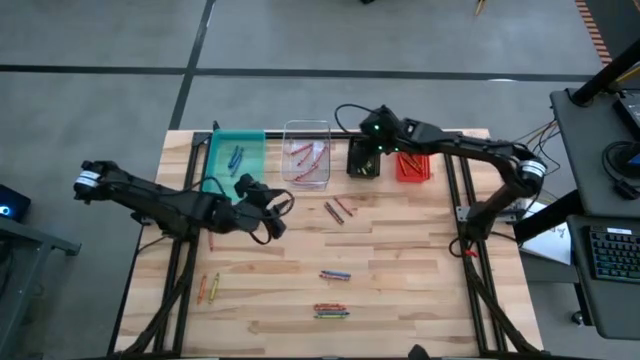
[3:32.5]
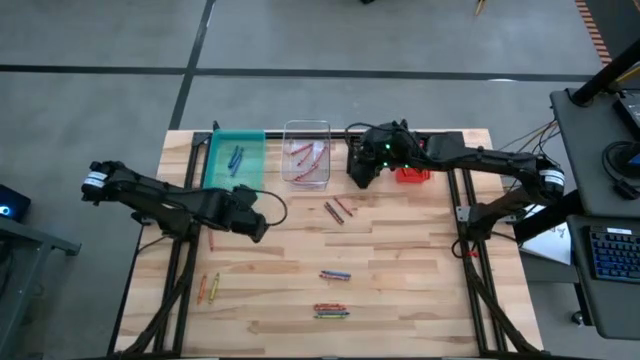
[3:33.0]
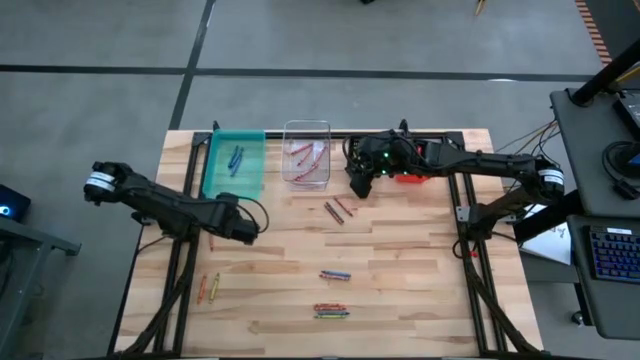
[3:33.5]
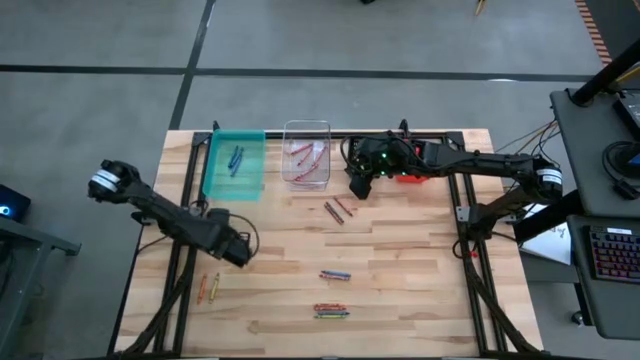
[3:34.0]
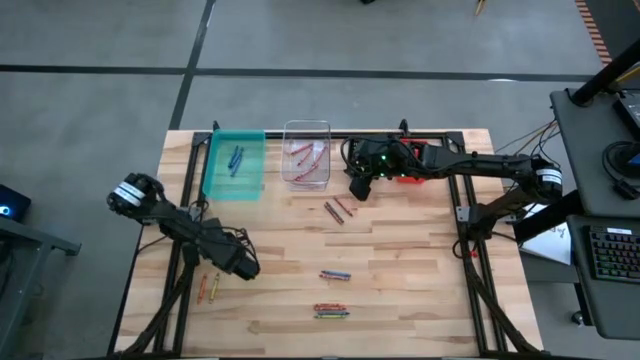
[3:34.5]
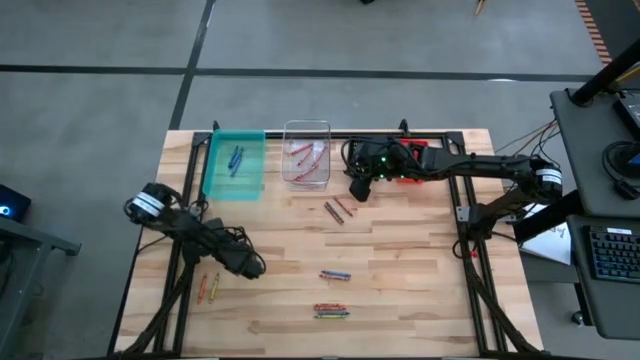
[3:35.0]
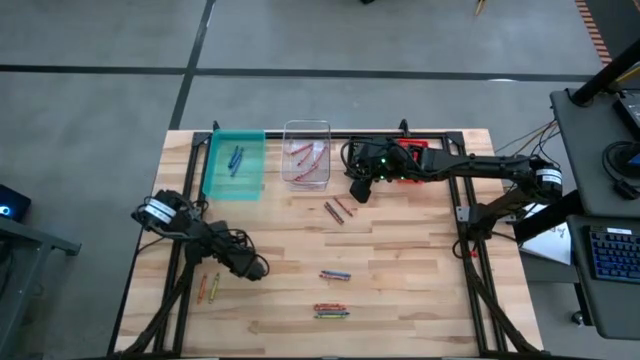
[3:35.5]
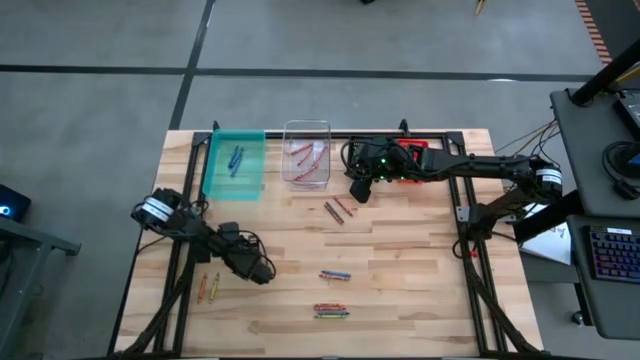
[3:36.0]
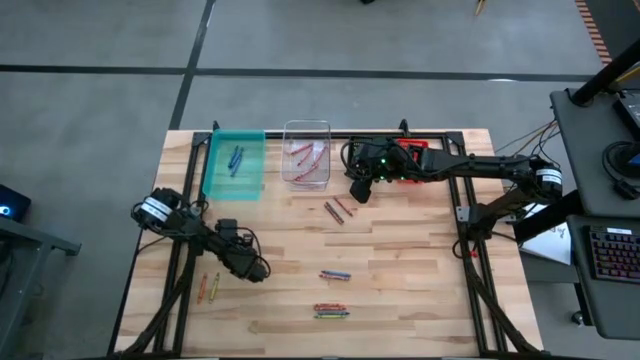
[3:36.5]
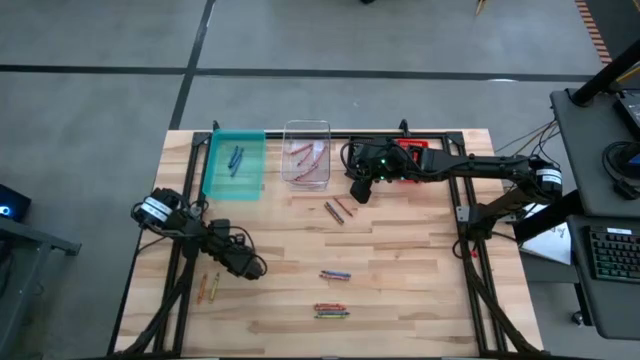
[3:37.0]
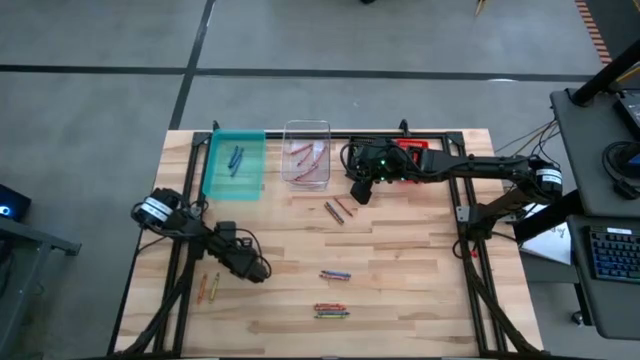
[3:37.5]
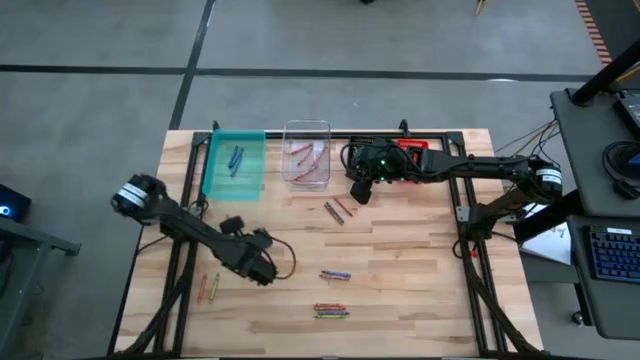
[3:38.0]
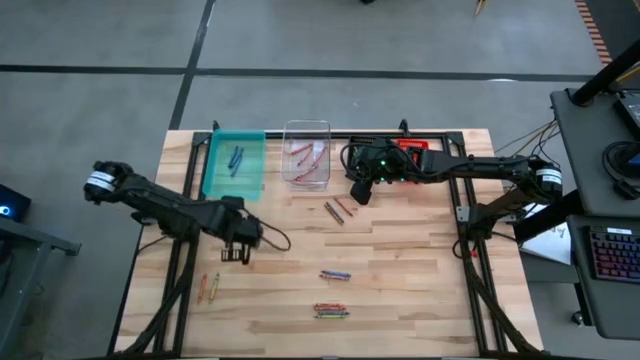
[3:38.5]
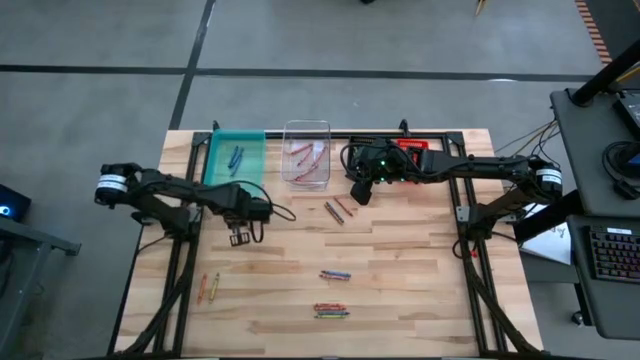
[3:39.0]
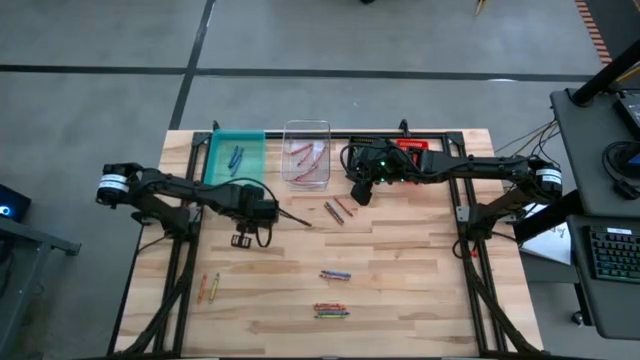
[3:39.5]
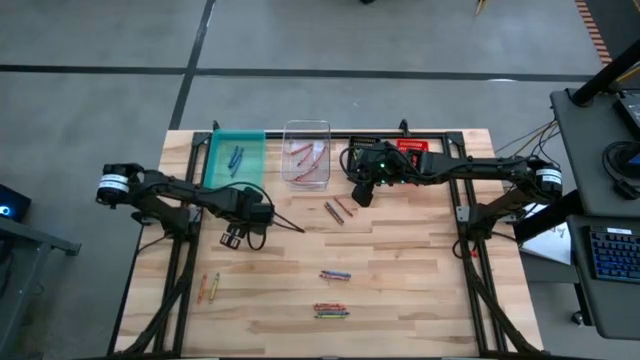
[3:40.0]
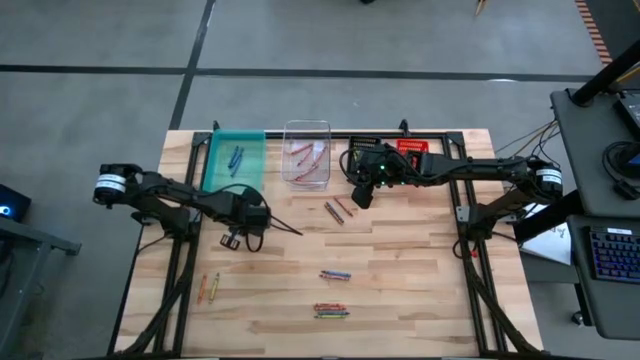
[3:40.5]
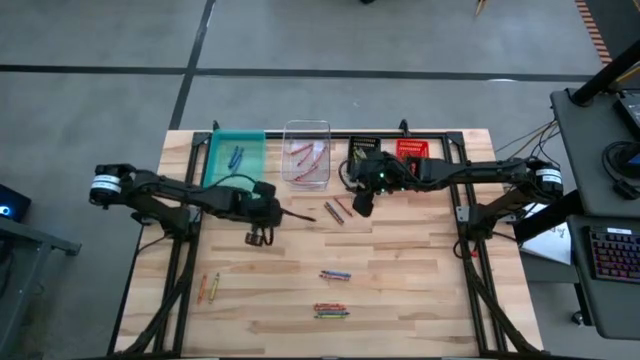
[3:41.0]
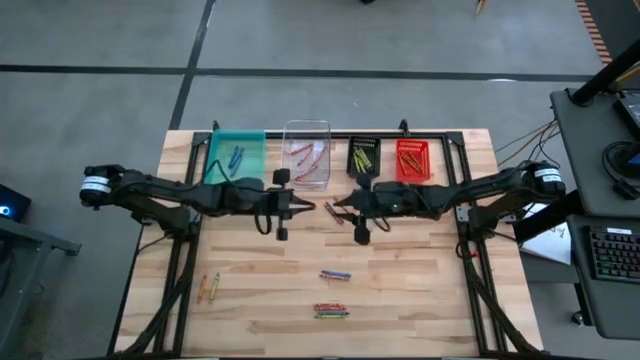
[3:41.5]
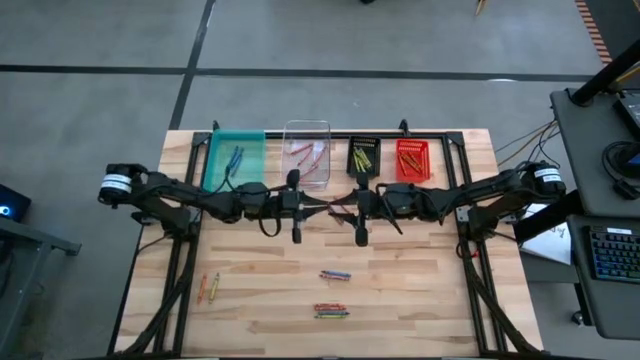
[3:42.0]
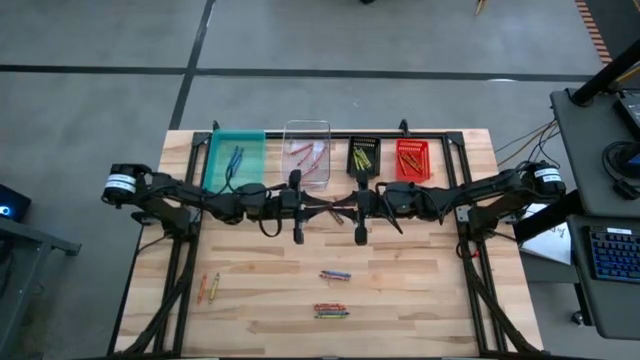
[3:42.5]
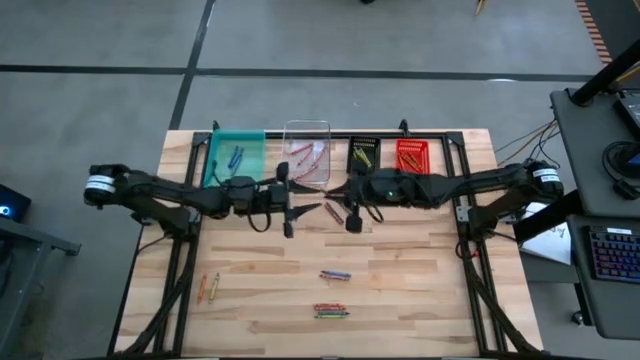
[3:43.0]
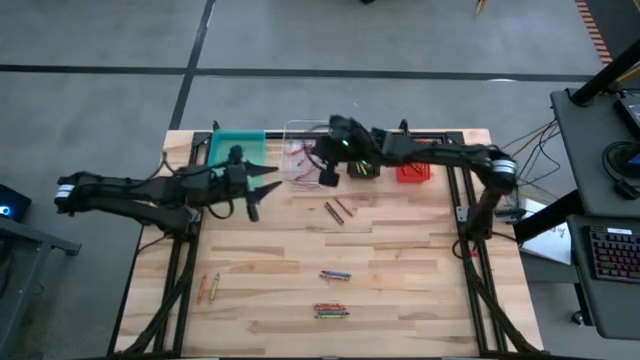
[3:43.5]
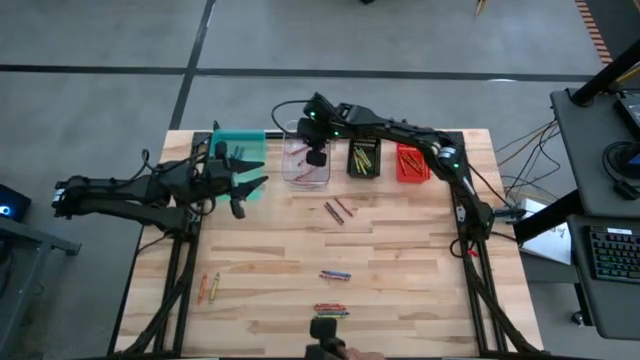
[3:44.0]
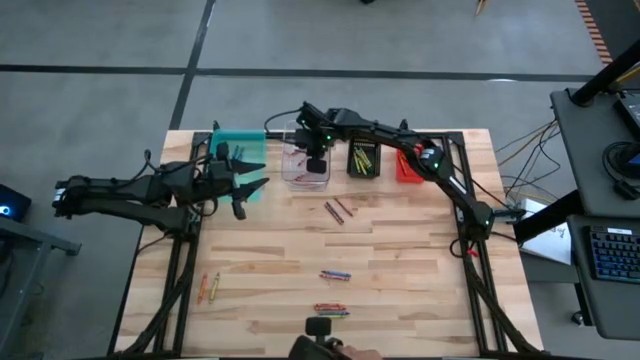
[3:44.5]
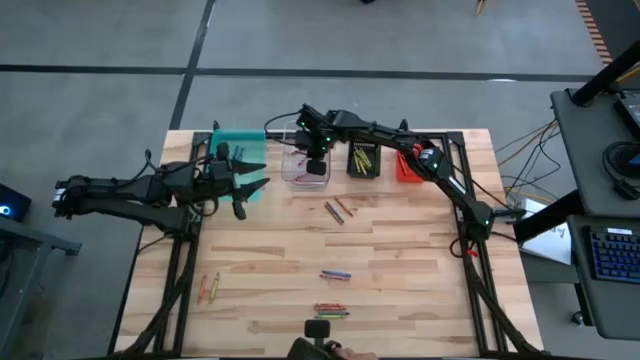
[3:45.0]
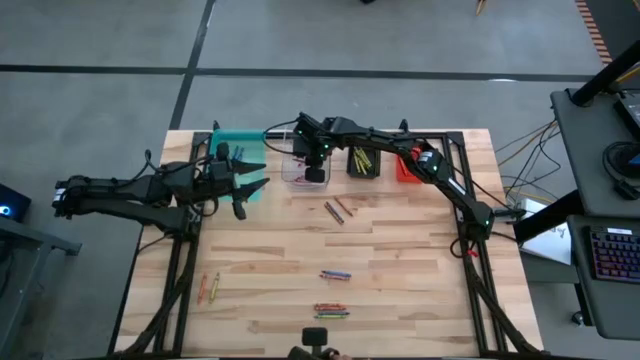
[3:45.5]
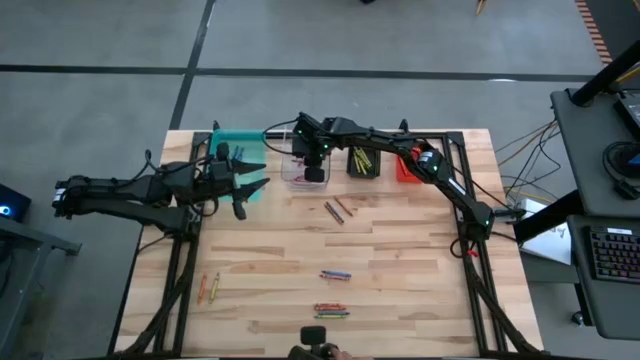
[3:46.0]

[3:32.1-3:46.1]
Task: Sort crayons
Put the red crayon into the transparent bin

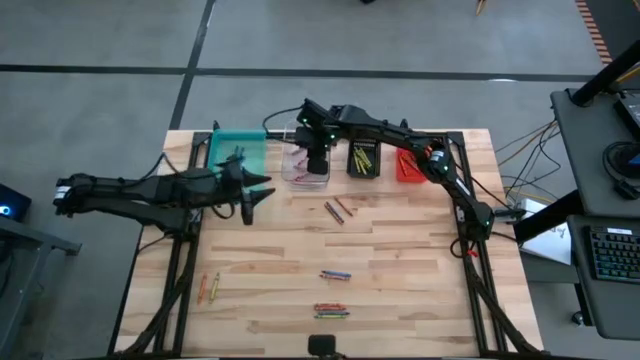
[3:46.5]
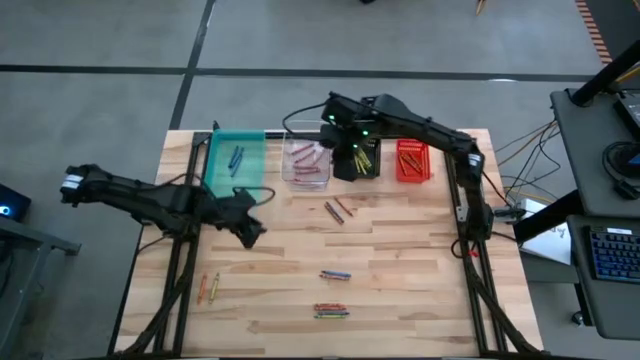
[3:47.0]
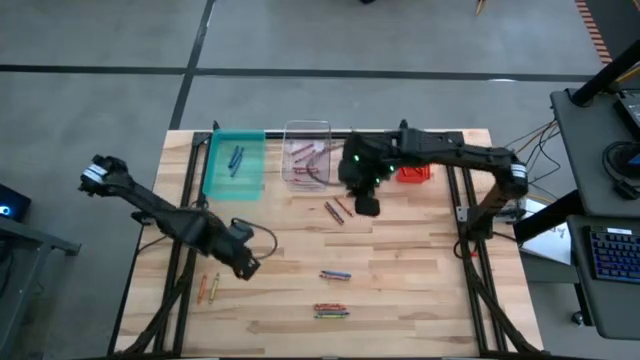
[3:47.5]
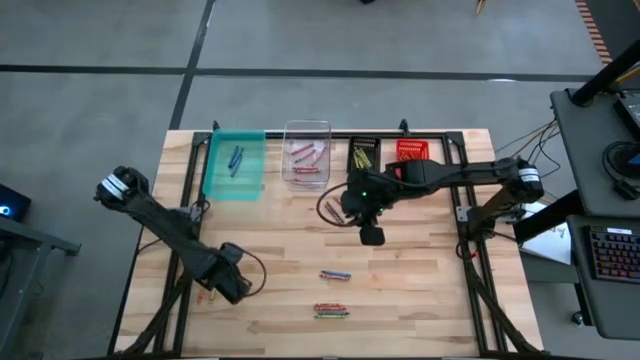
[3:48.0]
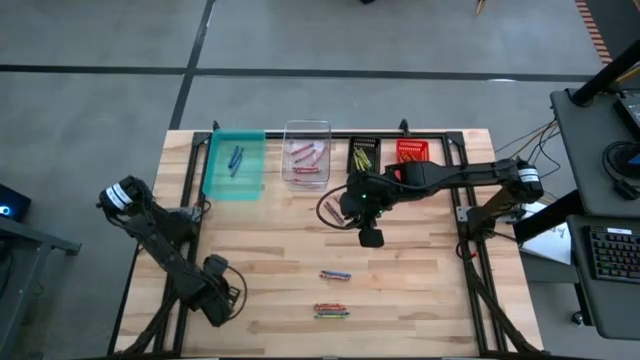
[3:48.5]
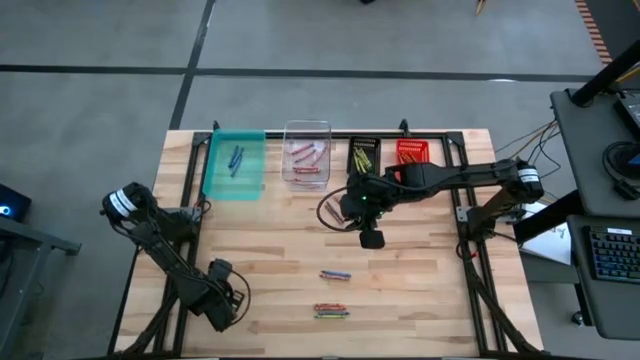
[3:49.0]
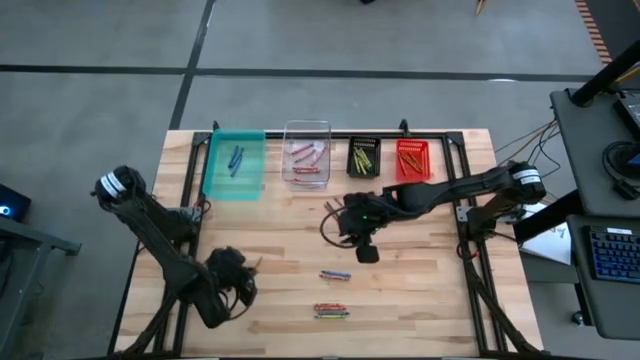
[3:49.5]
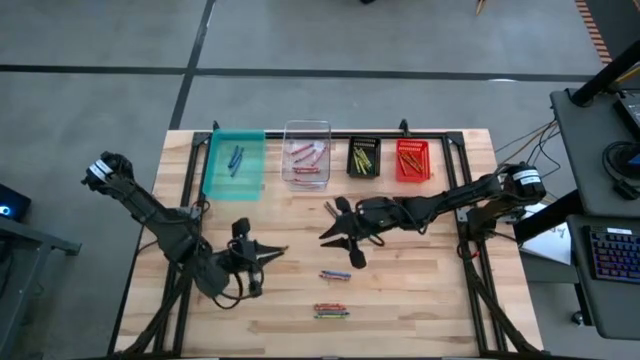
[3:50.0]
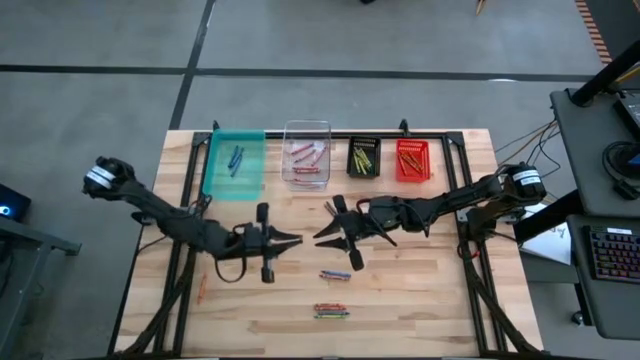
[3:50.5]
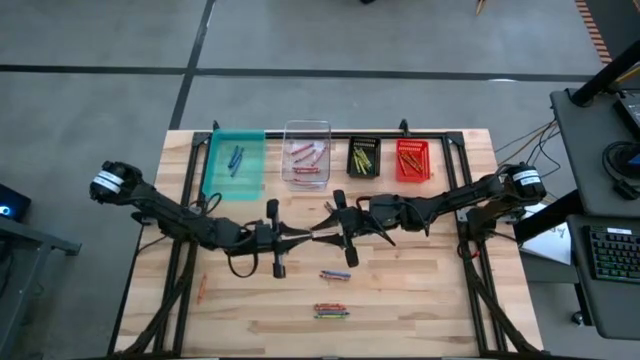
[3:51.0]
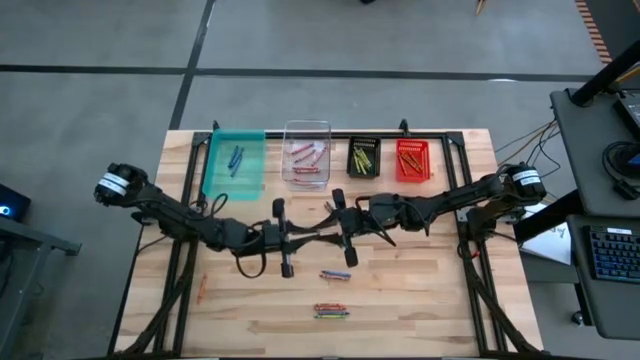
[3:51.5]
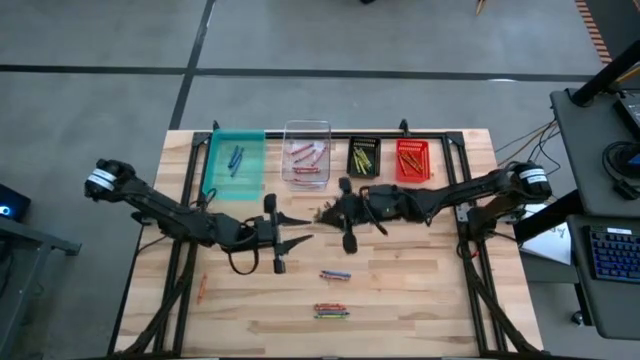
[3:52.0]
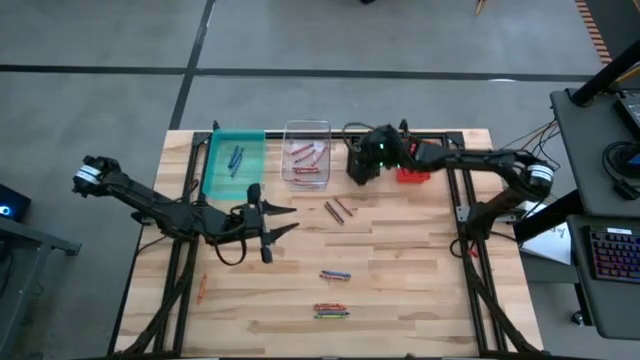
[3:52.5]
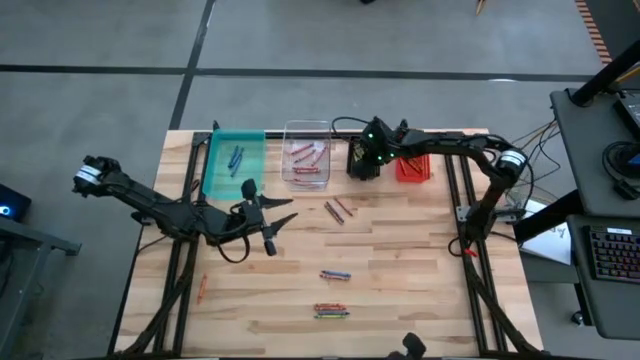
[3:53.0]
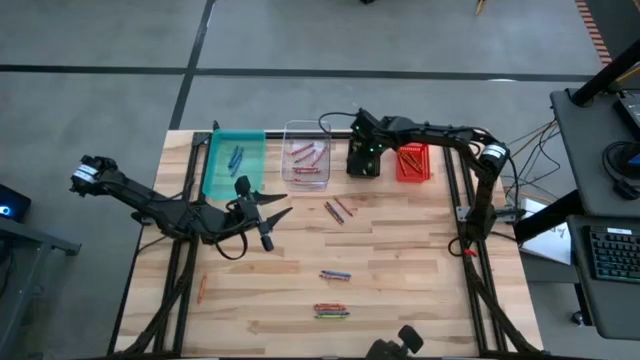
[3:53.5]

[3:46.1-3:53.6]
Put the green crayon into the black bin

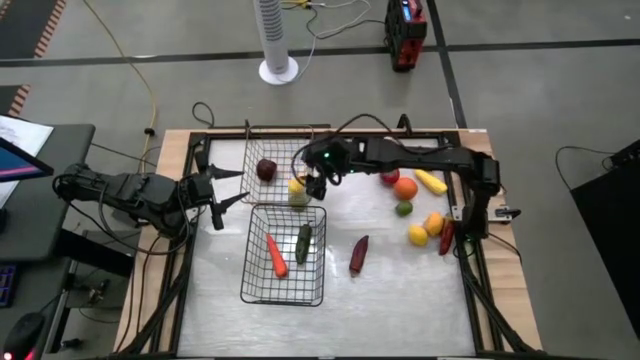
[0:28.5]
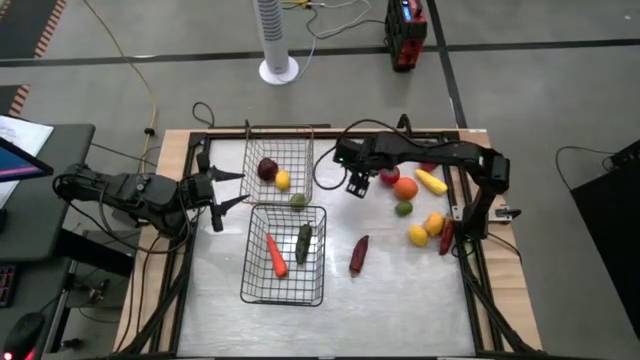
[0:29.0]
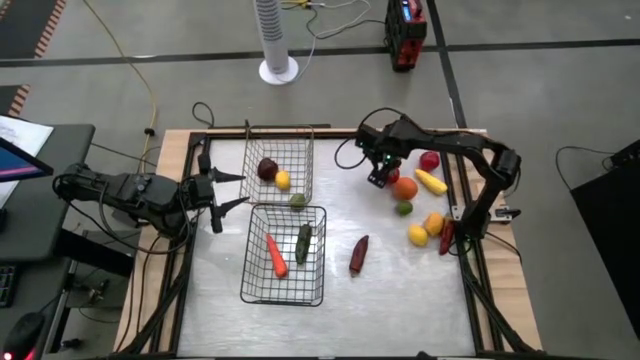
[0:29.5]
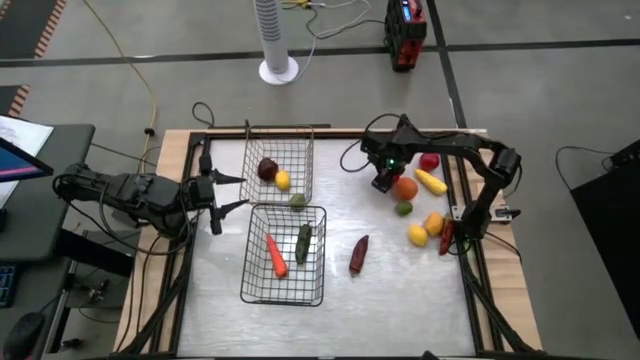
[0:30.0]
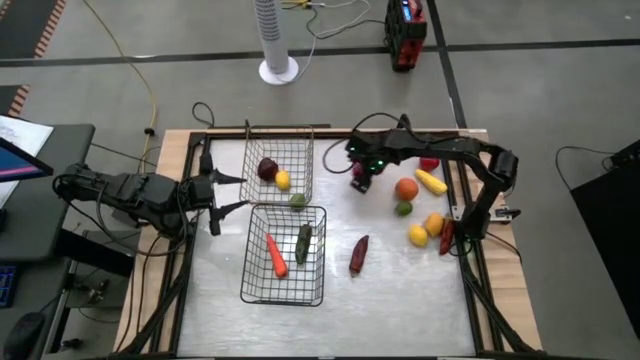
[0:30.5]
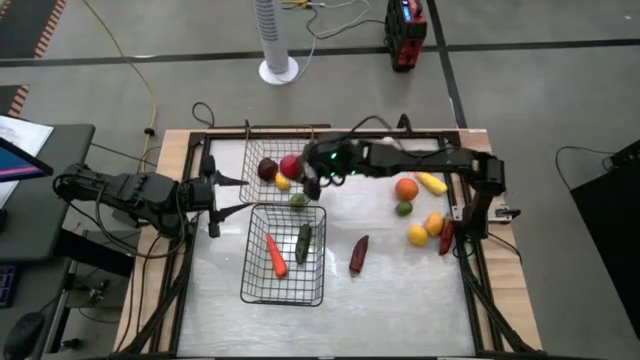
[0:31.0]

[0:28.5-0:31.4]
Task: Sort produce into baskets
Put the left tomato into the gold wire basket
